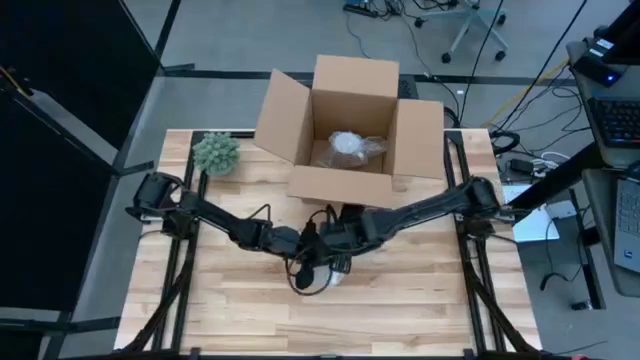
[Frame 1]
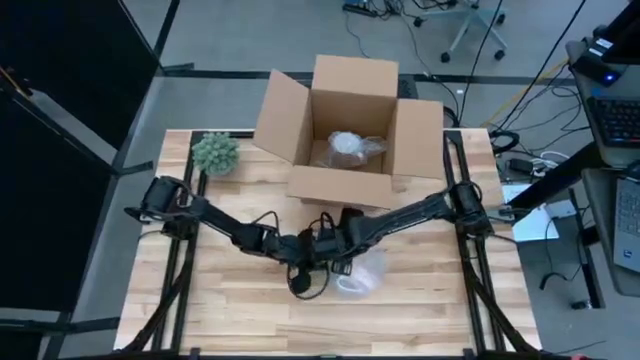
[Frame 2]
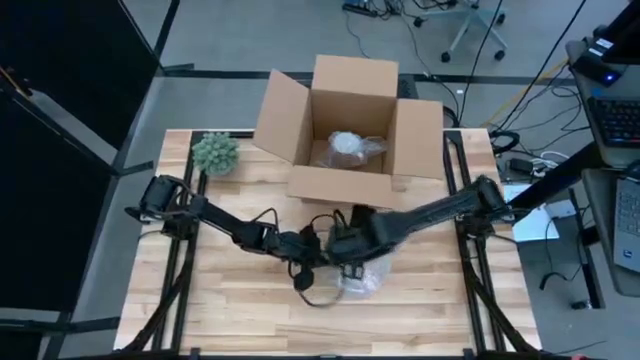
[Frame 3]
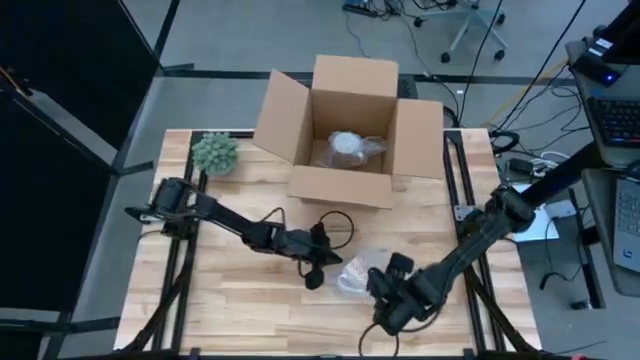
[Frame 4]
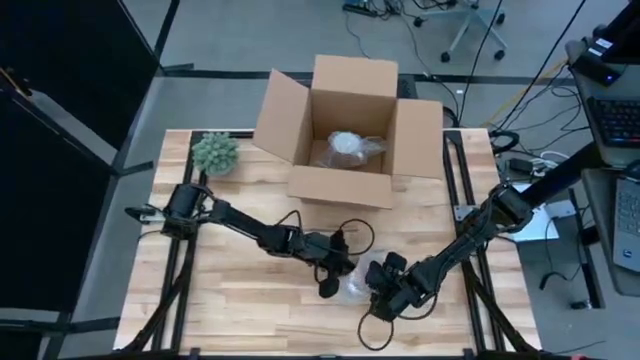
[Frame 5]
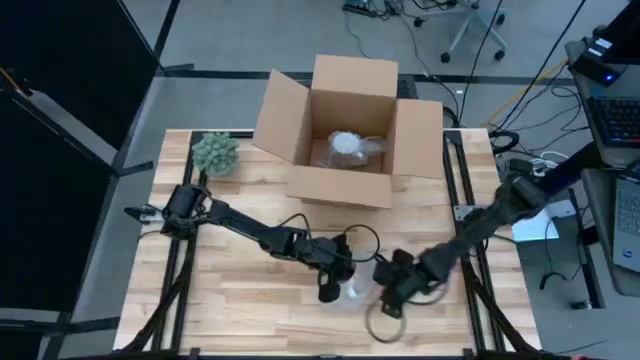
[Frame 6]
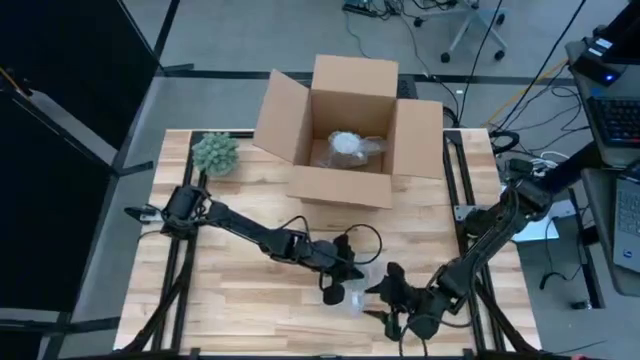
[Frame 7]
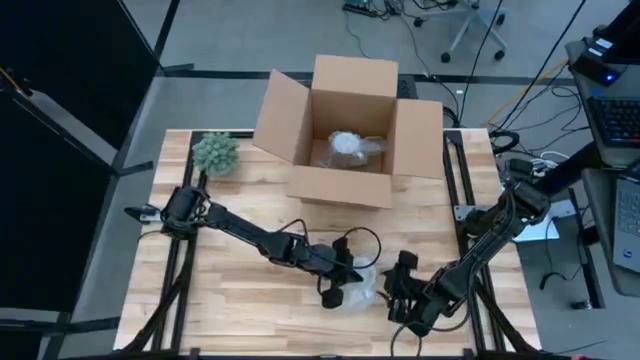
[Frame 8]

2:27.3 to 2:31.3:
Task: wrap mug
Wrap the orange mug with bubble wrap

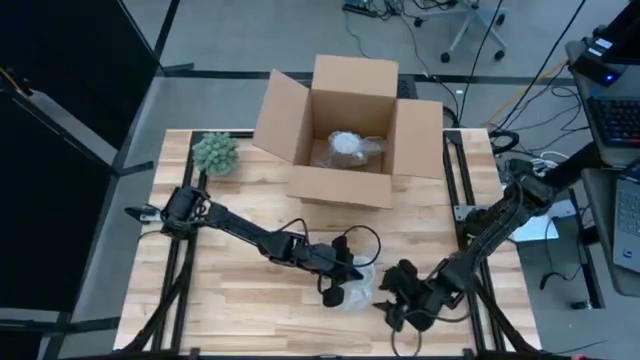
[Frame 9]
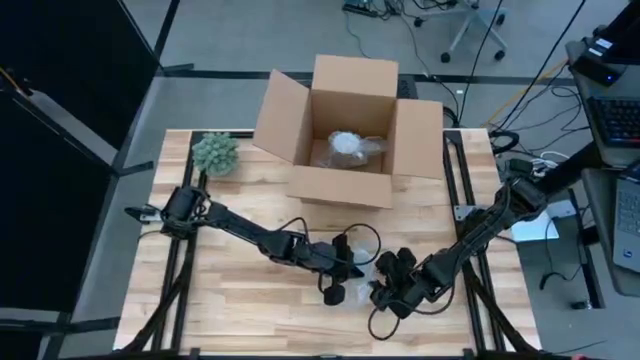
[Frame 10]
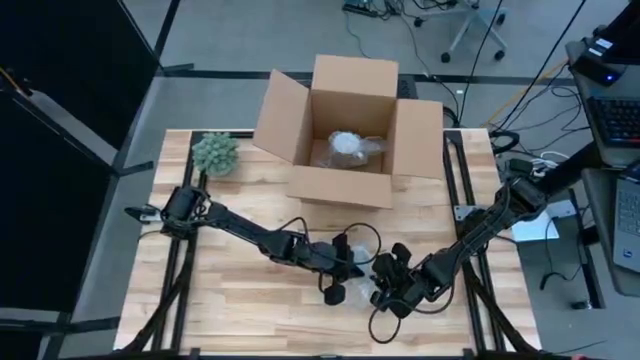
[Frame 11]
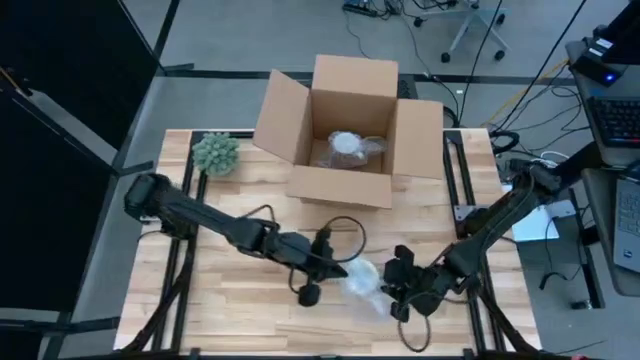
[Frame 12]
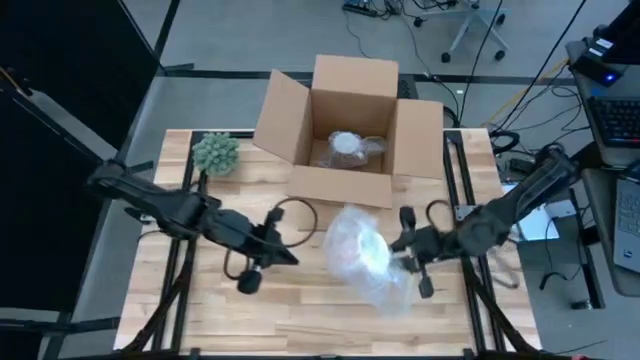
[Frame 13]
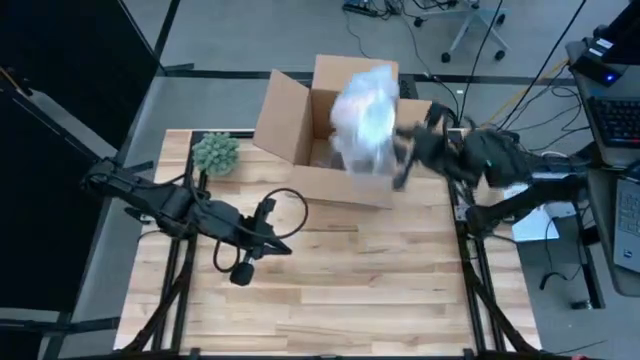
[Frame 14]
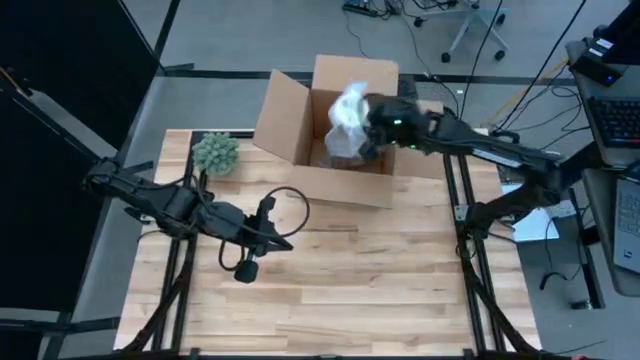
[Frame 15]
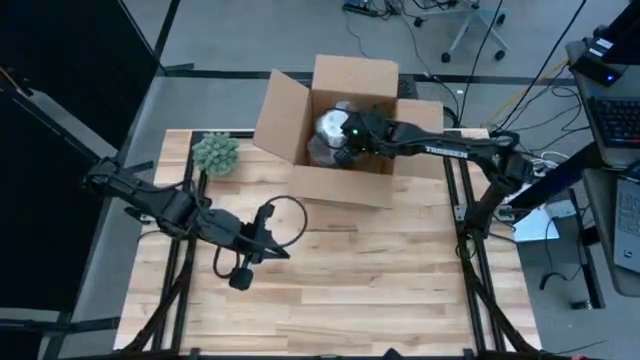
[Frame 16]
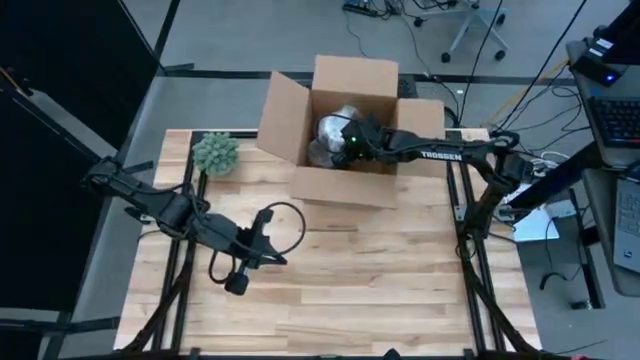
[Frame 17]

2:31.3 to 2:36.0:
Put the orange wrapped mug into the box

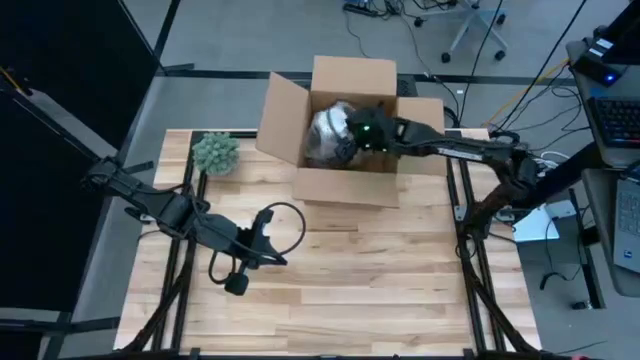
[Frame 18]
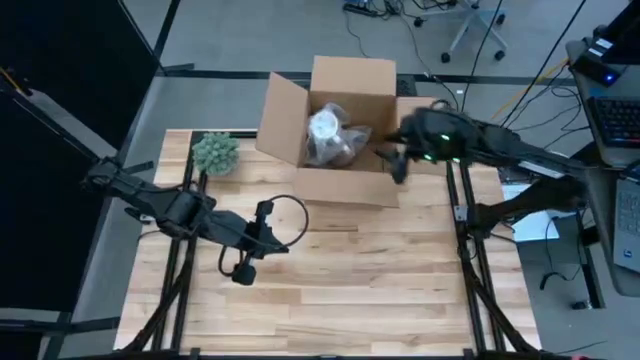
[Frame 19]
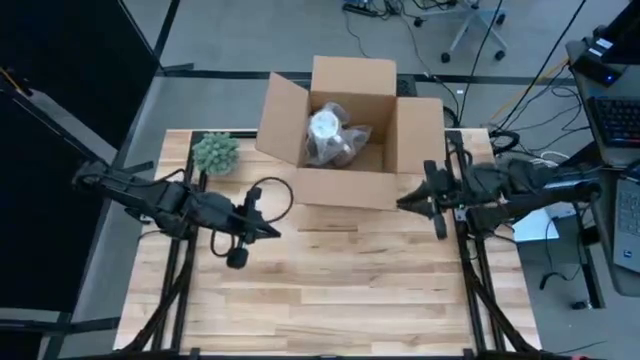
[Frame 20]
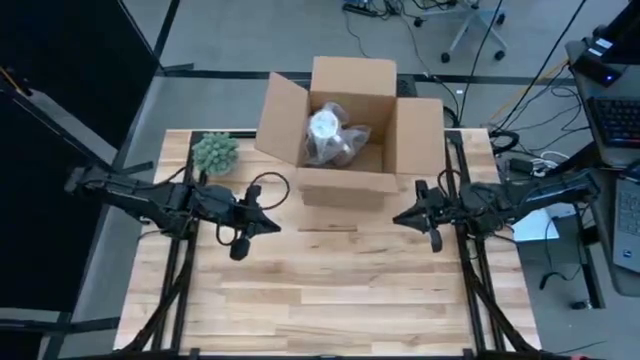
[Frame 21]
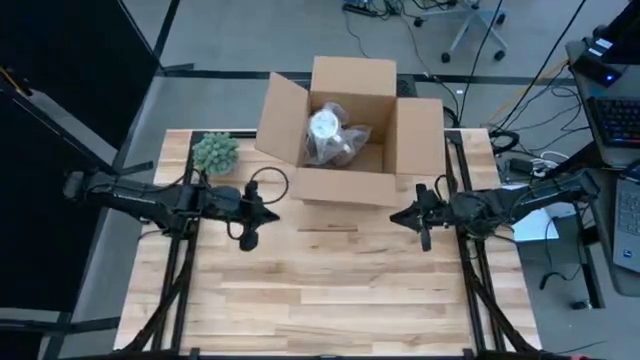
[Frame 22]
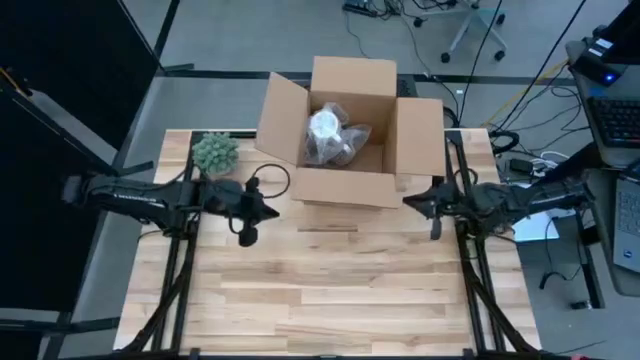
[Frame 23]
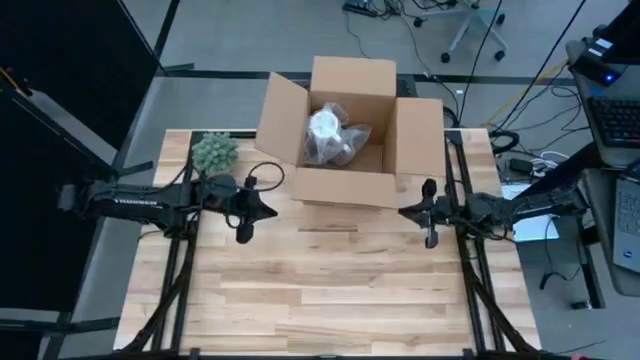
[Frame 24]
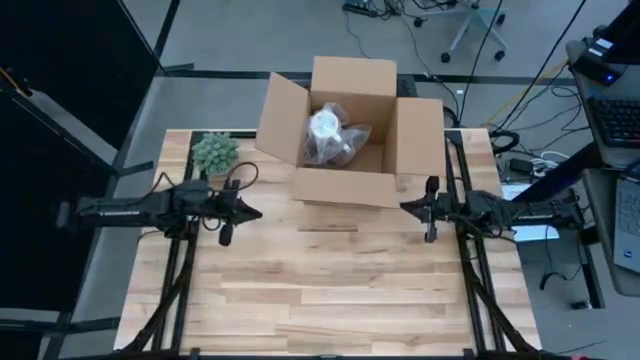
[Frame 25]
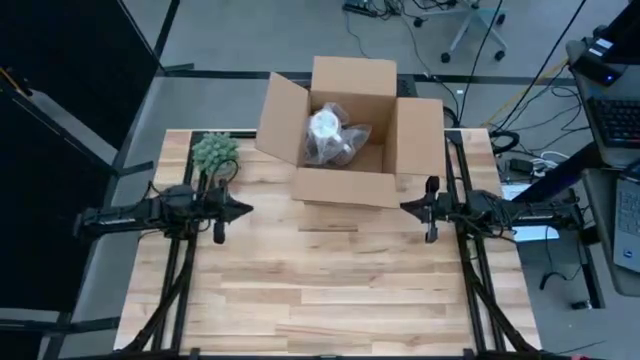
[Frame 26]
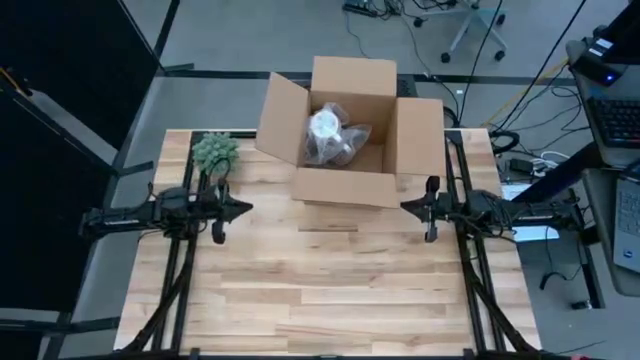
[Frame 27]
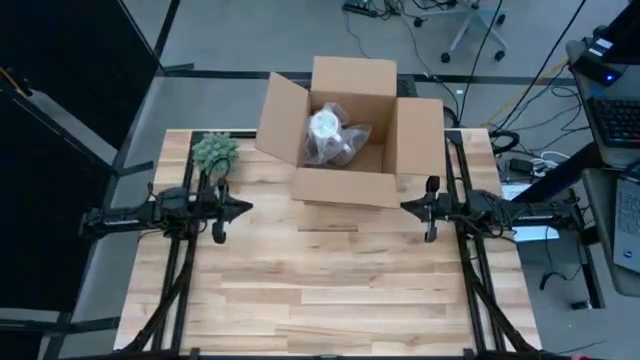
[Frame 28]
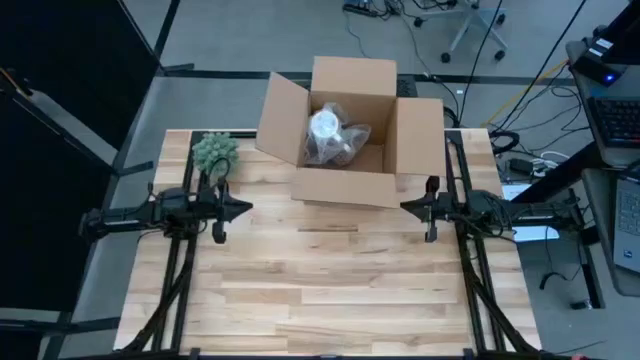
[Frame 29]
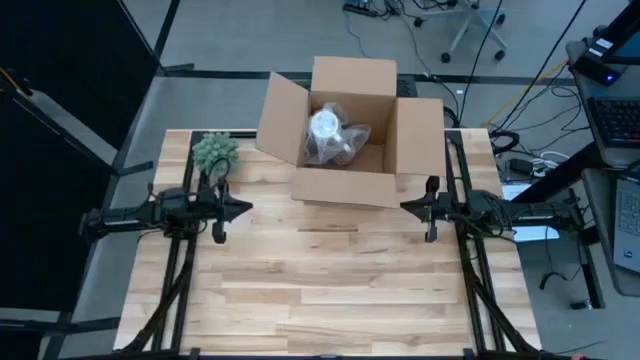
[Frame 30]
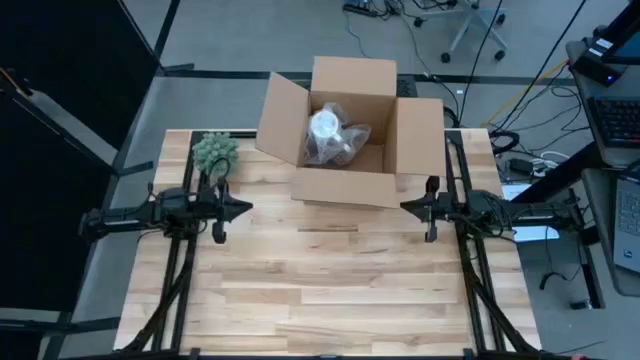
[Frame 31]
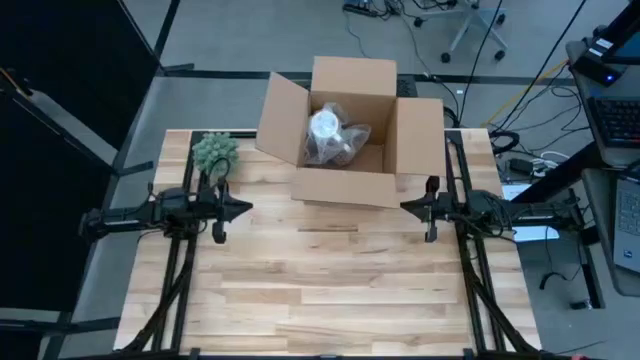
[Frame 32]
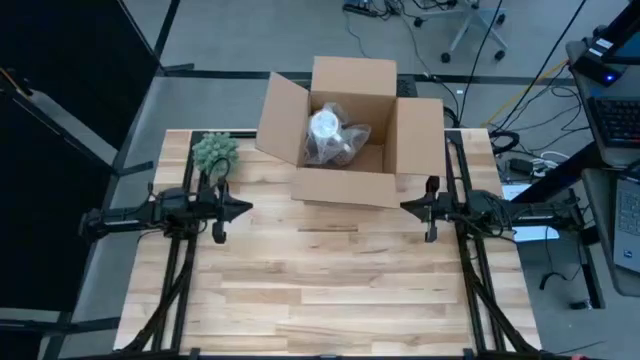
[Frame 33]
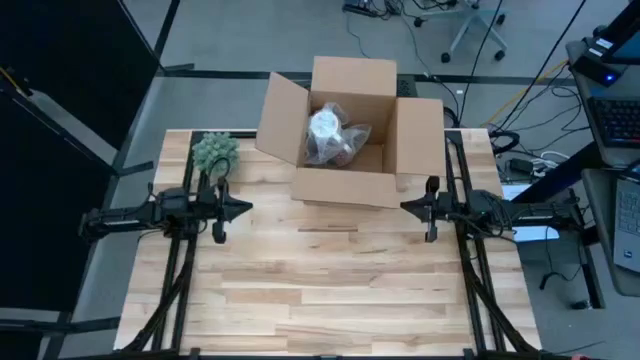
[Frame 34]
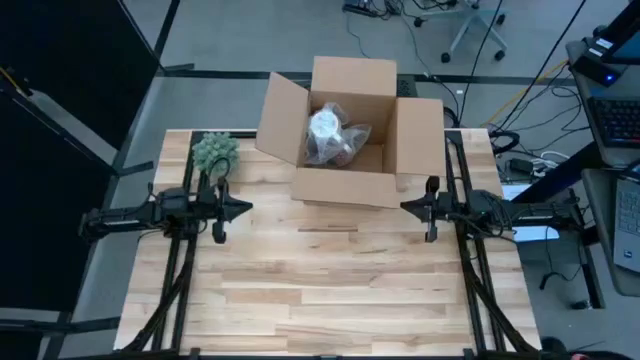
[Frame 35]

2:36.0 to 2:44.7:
Return to Home Position

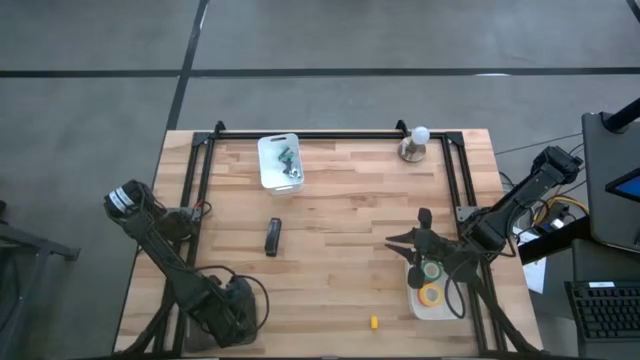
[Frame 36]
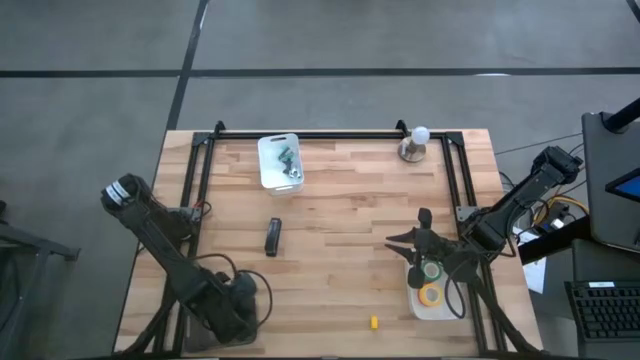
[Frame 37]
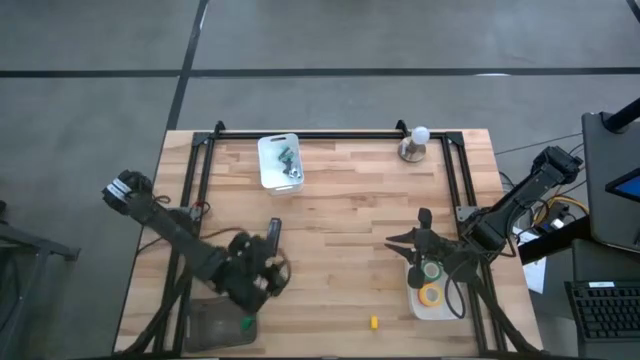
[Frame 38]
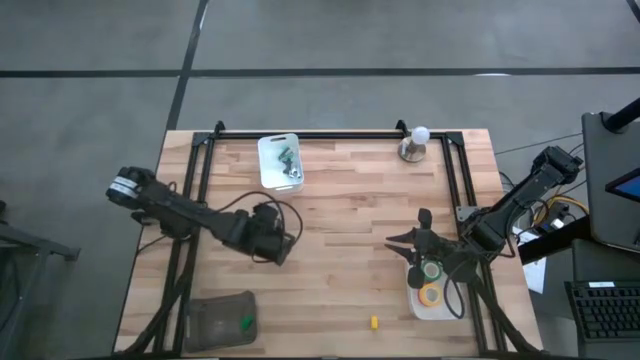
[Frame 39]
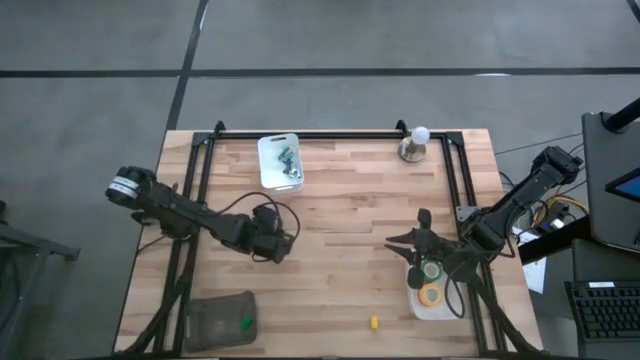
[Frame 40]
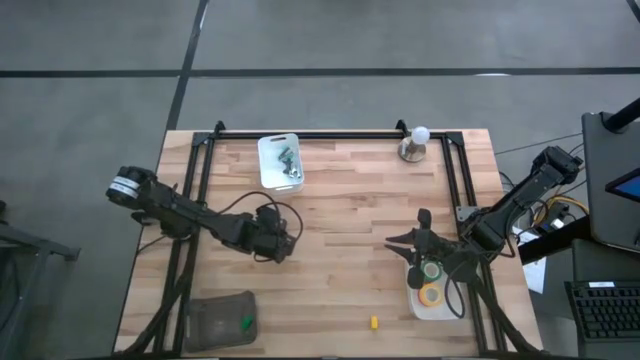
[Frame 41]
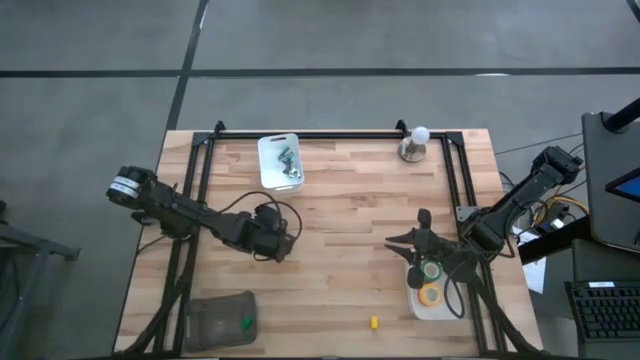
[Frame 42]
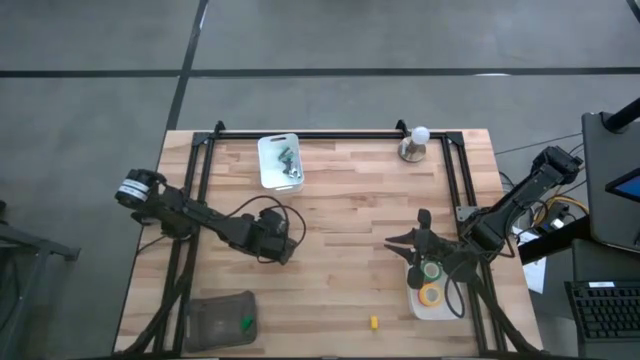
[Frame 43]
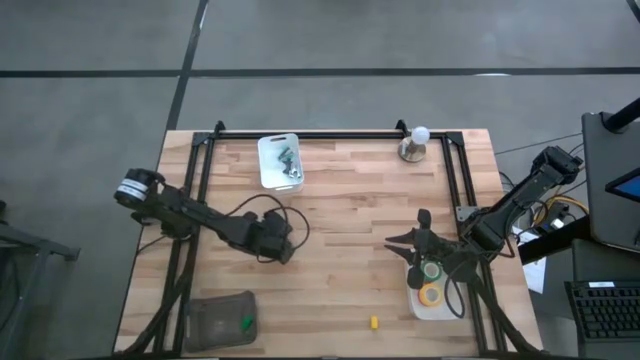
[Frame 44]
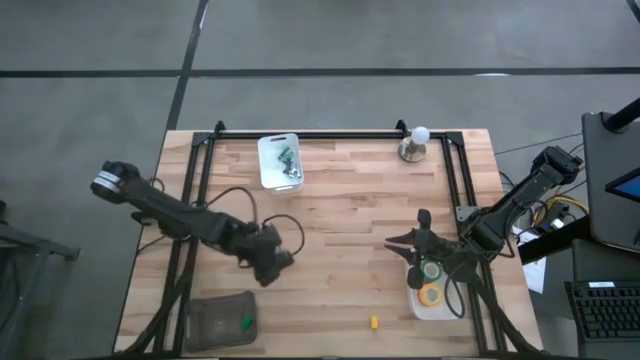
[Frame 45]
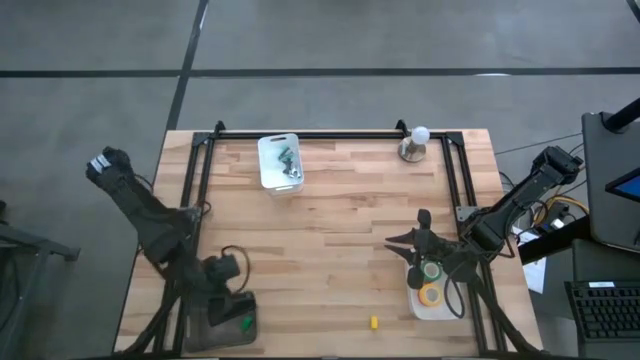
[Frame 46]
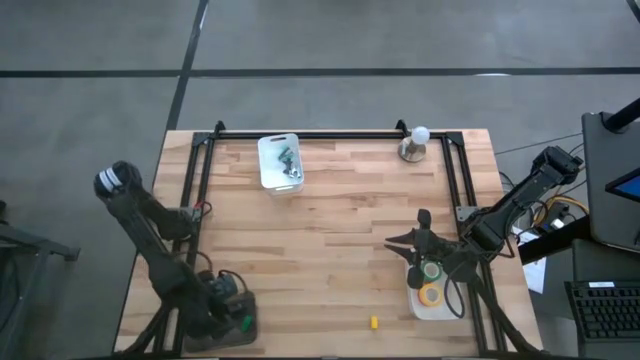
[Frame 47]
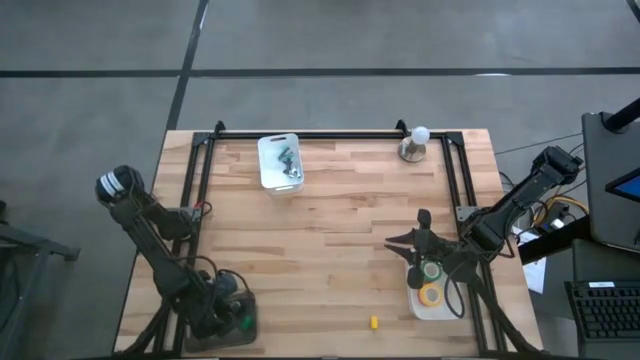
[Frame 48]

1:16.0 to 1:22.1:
Task: Pick and place Stapler, Stapler remover, tape
Put the black stapler into the black bin
